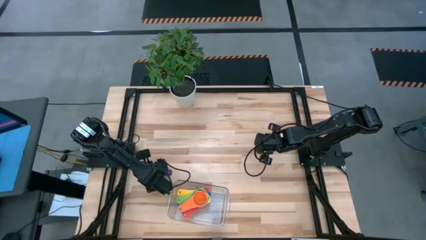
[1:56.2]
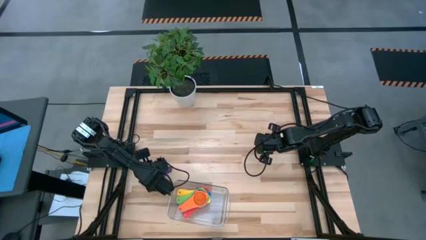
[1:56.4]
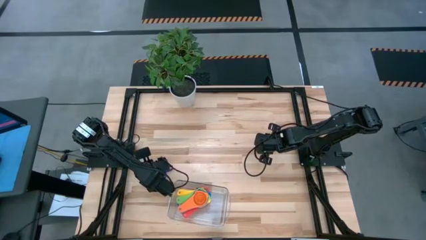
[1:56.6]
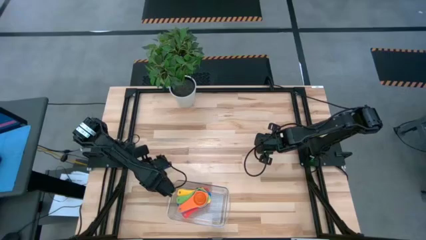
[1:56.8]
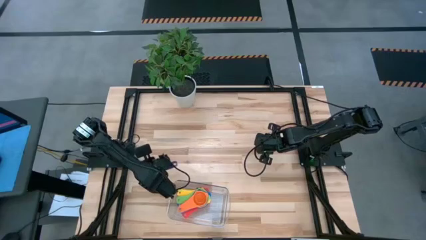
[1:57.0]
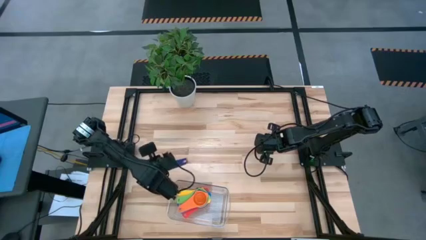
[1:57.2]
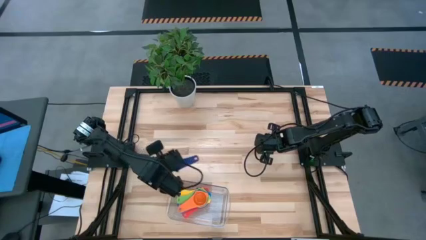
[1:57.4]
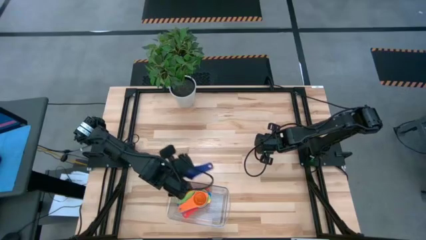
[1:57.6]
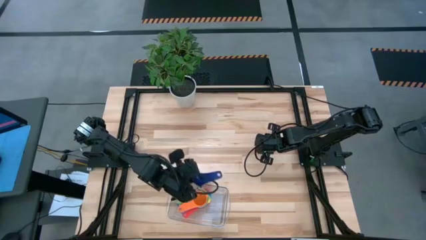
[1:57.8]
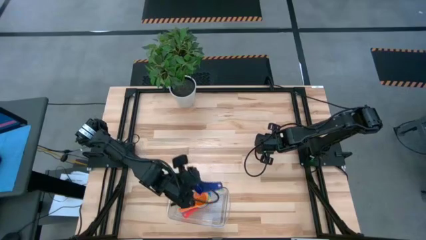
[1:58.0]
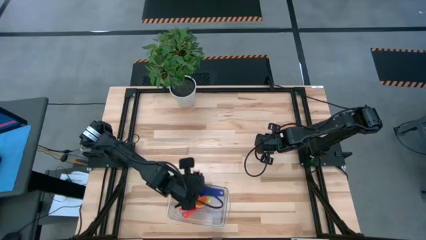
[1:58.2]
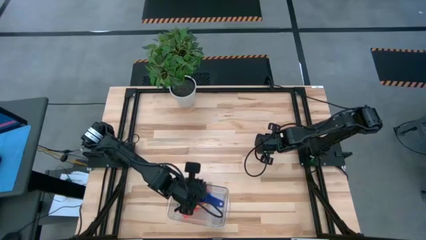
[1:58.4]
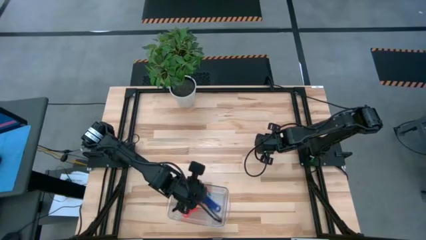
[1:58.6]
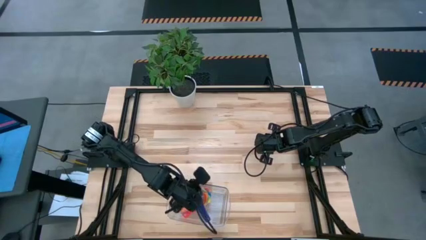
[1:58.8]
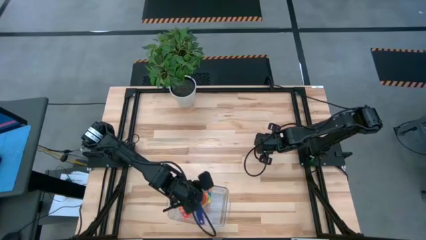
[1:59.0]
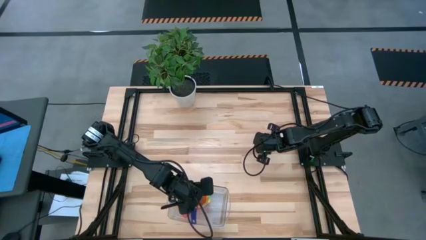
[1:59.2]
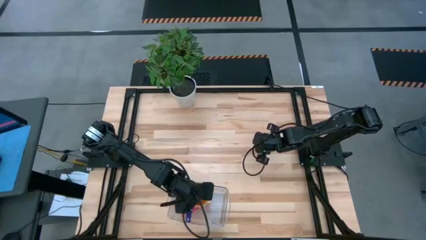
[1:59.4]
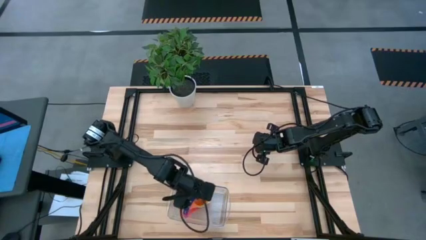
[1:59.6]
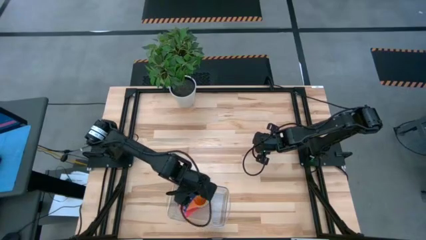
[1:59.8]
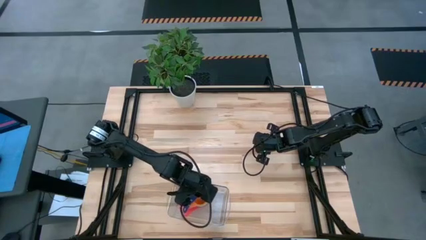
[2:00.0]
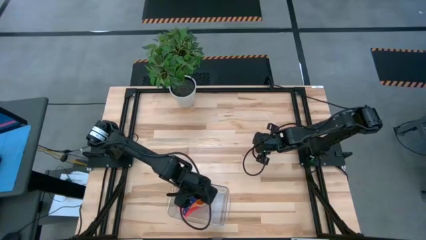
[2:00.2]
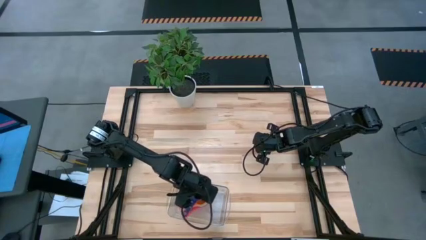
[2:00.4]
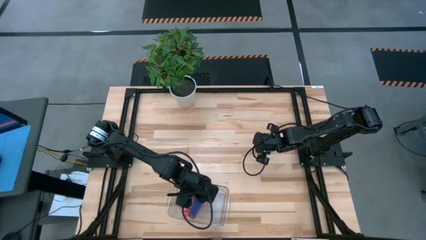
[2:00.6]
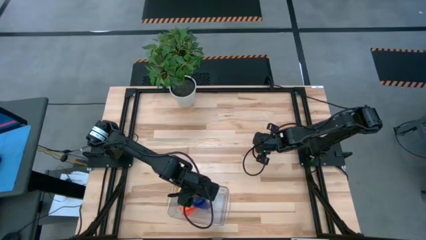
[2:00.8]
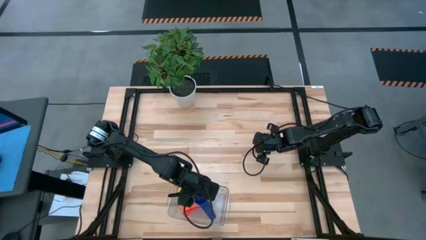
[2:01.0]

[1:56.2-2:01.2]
Task: Nest measuring cups in basket
Stack the dark blue measuring cup on top of the orange measuring cup

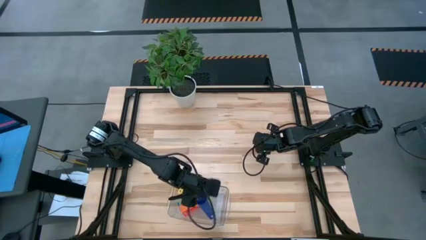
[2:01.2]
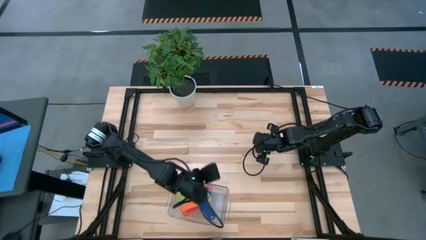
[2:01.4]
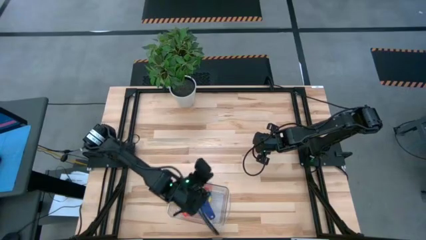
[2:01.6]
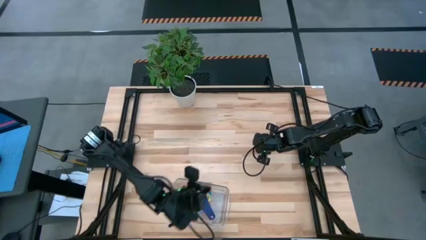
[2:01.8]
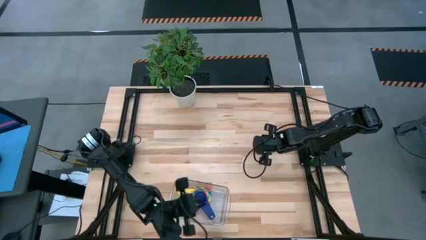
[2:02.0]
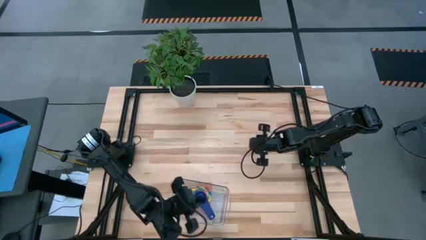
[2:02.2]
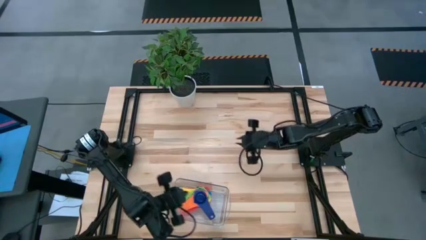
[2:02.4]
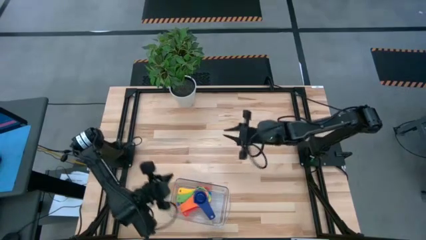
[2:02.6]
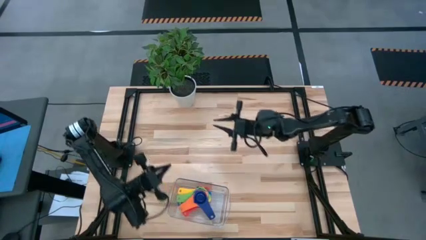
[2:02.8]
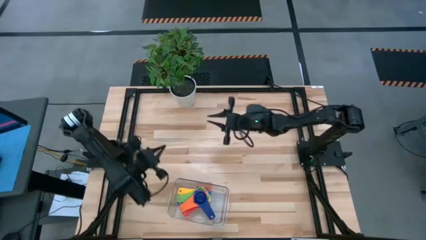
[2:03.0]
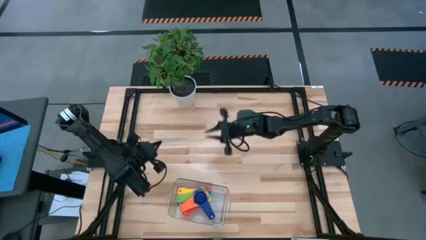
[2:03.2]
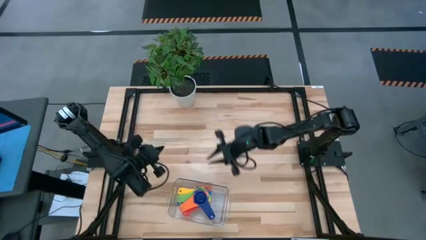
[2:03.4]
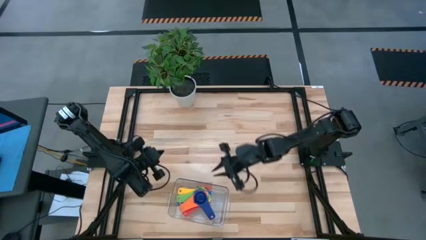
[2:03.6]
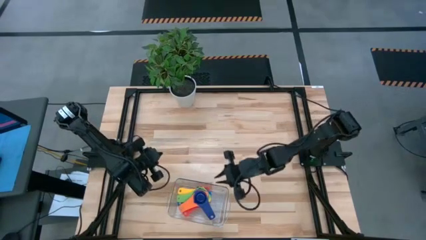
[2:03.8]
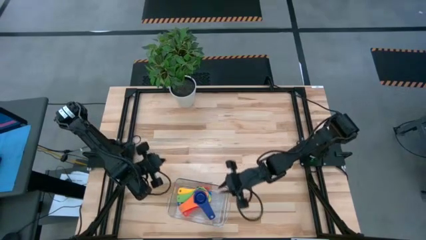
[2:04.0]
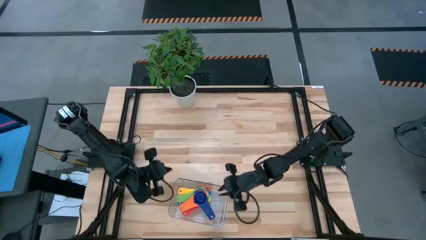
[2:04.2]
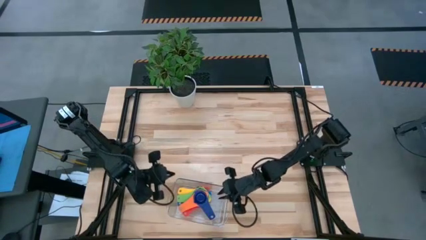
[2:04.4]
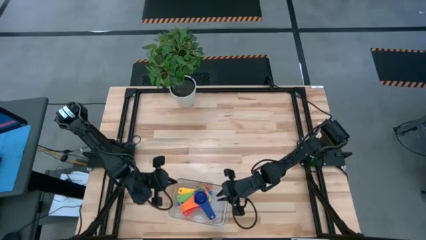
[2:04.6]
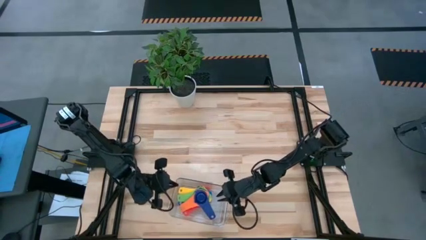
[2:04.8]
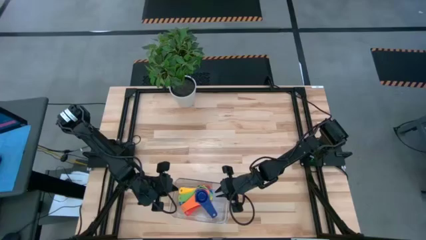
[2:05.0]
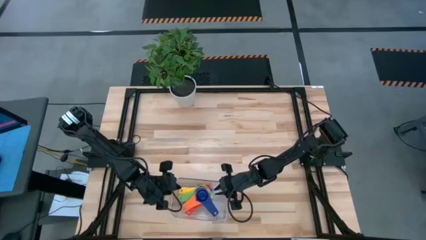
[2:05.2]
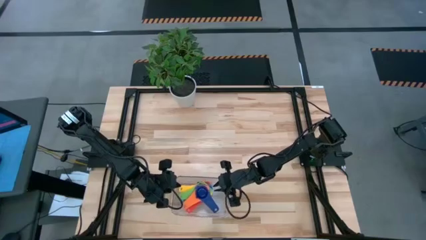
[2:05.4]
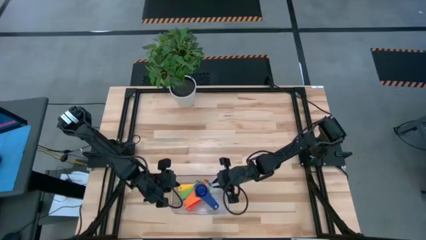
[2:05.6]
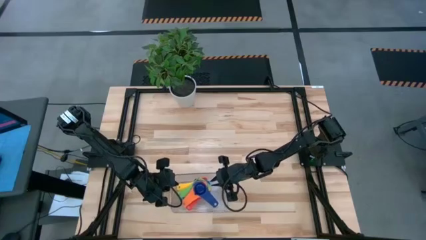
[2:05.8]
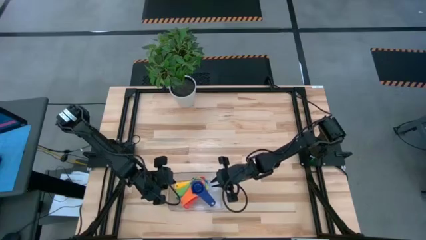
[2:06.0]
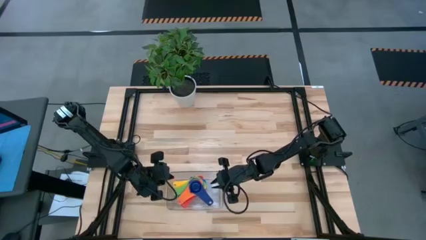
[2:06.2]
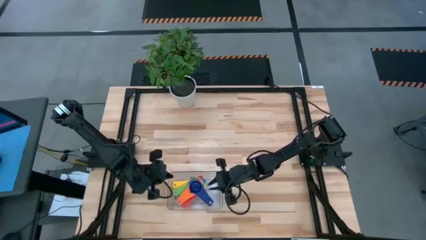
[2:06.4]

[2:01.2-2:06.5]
Adjust the transparent bin on the table

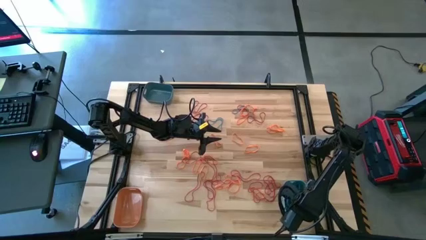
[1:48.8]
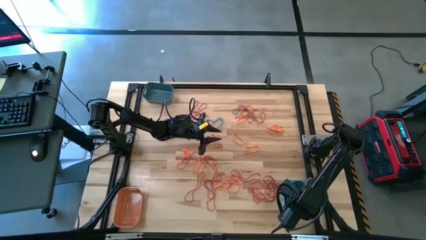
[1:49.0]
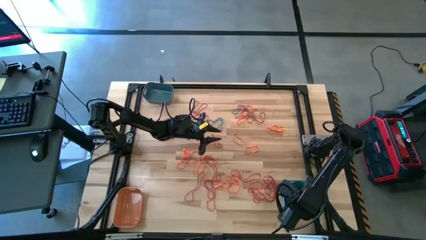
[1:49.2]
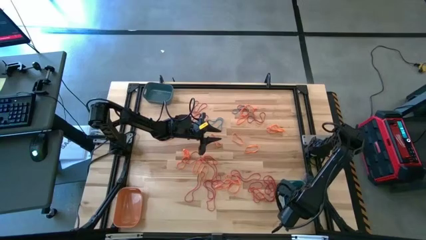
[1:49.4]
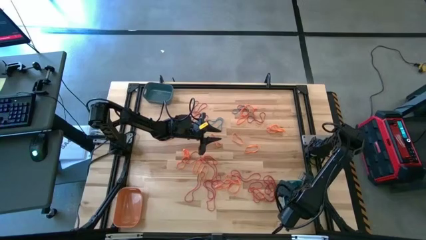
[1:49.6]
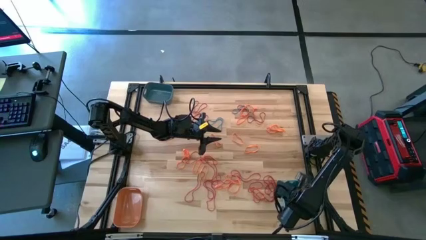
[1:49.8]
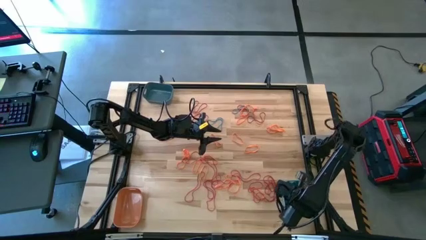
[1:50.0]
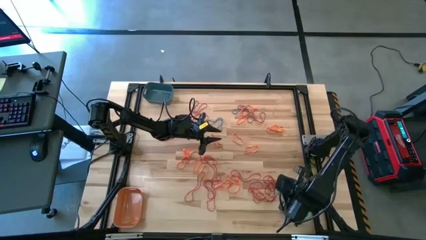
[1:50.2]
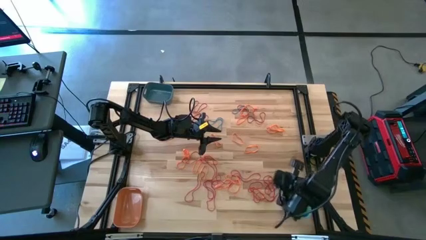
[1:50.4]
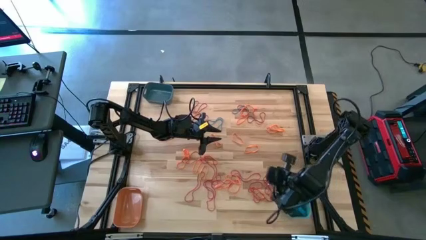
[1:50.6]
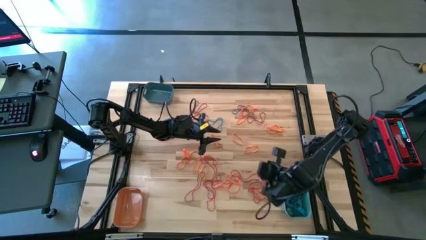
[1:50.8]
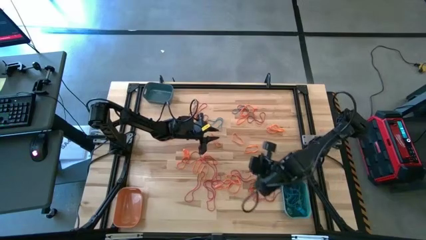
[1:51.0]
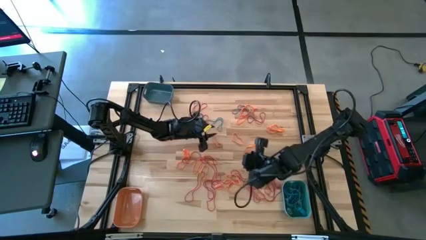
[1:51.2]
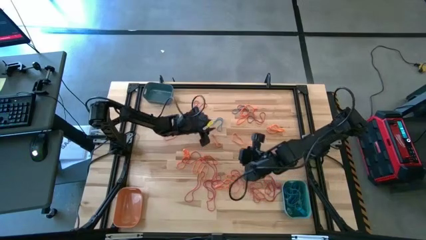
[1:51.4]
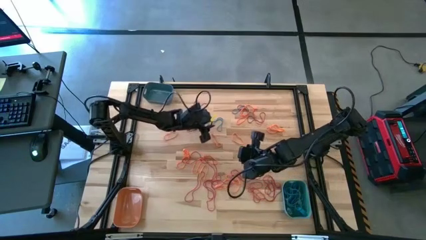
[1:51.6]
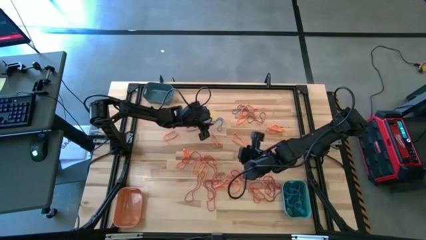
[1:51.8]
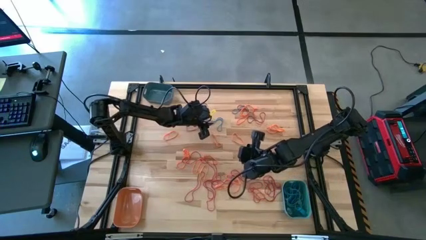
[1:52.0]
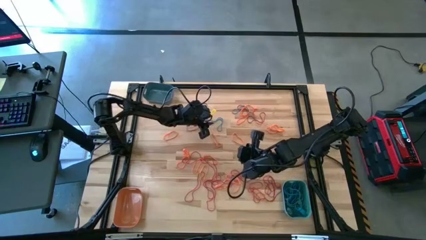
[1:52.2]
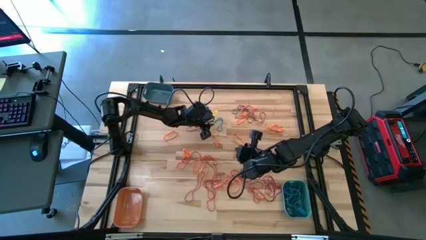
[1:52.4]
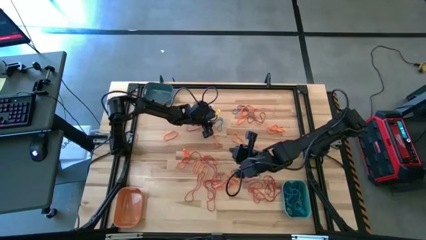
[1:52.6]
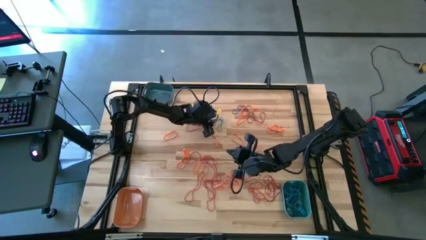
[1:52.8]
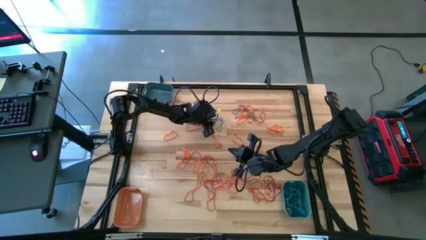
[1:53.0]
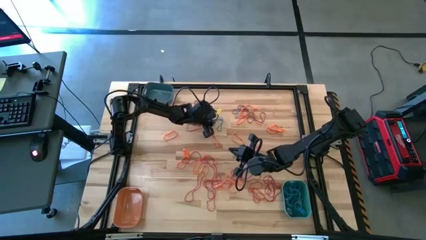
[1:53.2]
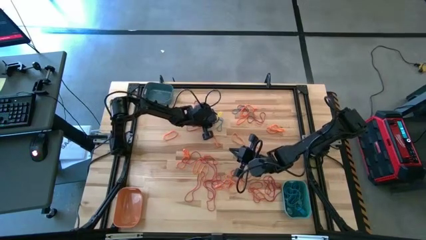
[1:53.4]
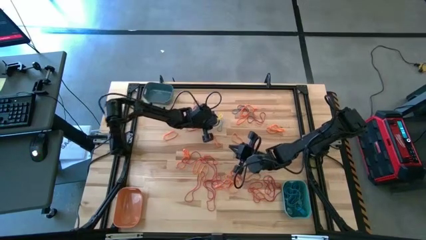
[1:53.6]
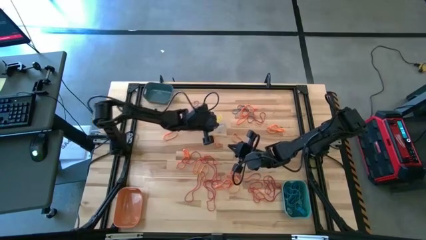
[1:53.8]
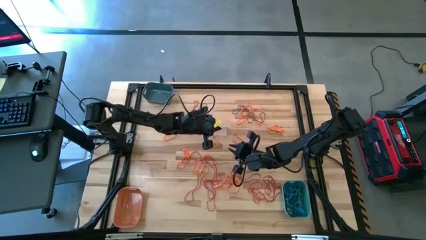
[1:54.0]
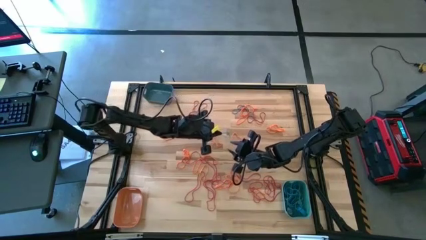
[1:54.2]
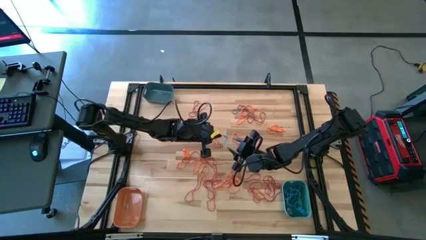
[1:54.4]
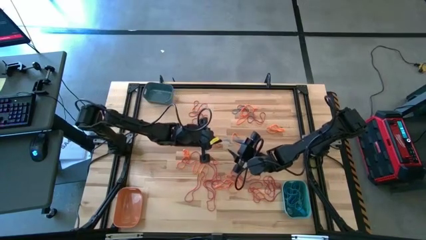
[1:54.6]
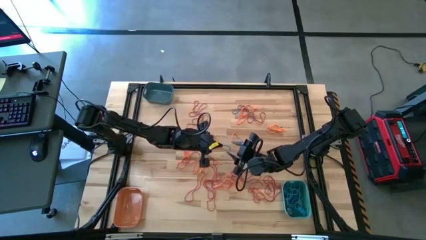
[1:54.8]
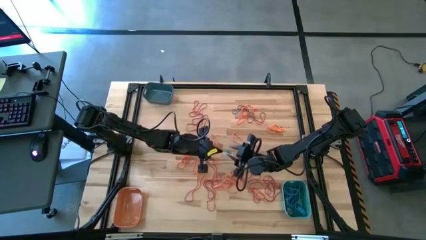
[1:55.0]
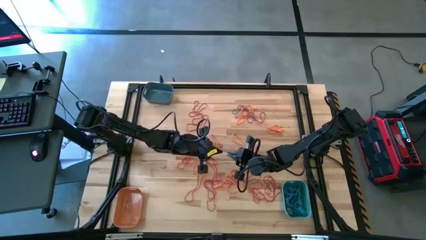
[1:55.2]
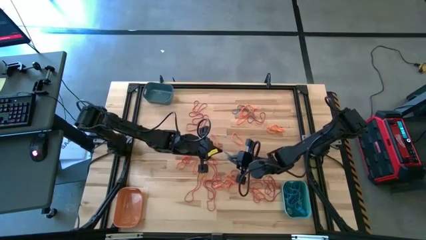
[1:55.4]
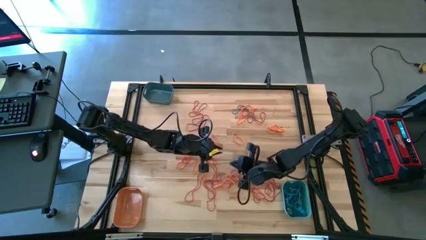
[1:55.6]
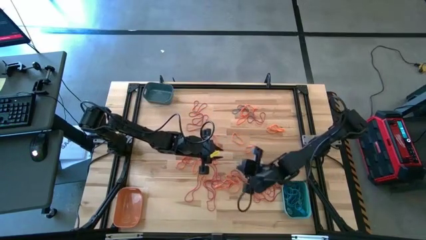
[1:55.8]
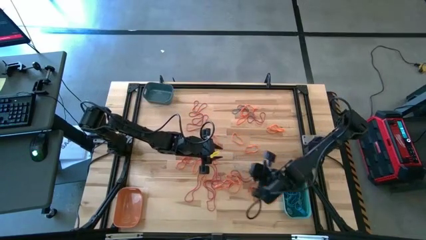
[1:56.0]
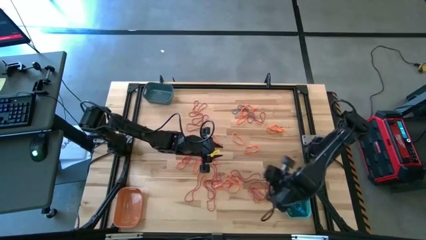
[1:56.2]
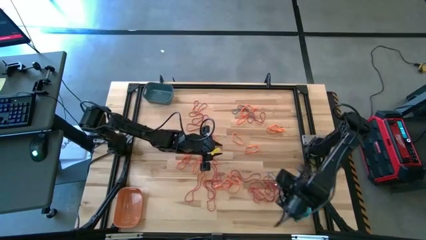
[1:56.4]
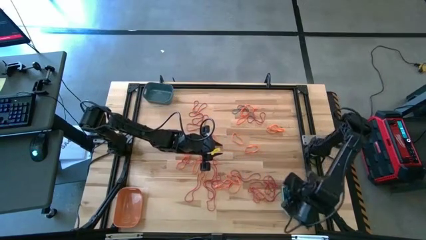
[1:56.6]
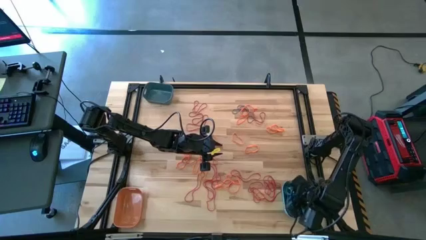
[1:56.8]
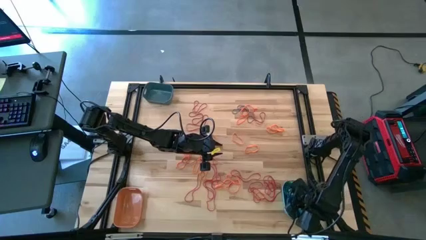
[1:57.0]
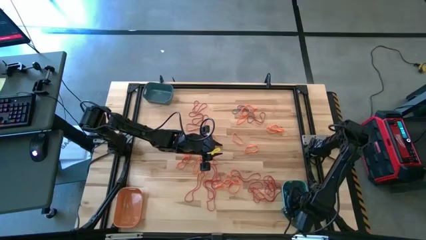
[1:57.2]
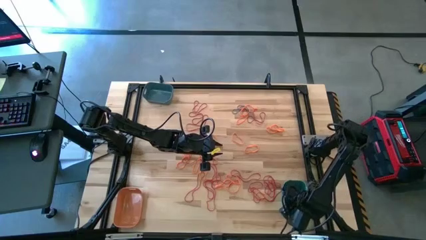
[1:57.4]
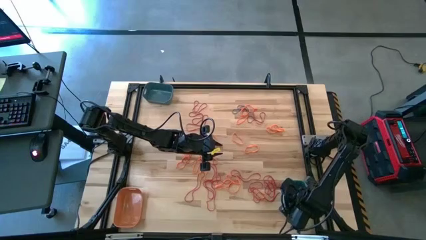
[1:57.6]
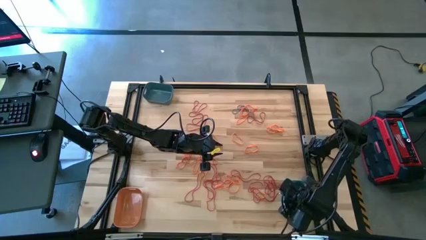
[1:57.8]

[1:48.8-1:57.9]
Task: Sort rubber bands into baskets
Put the blue rubber band into the light blue bin
